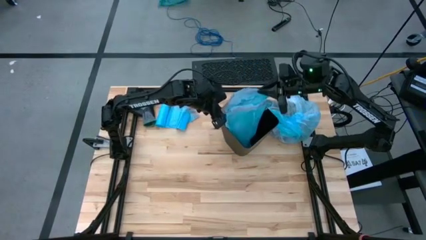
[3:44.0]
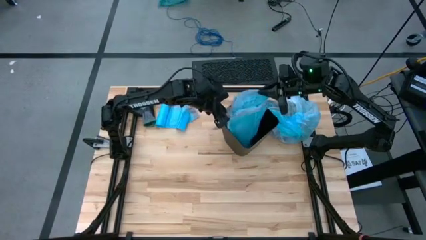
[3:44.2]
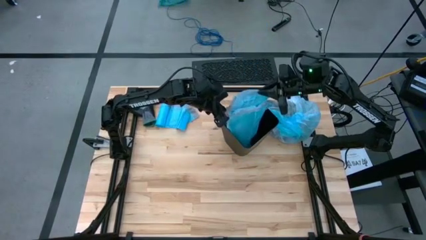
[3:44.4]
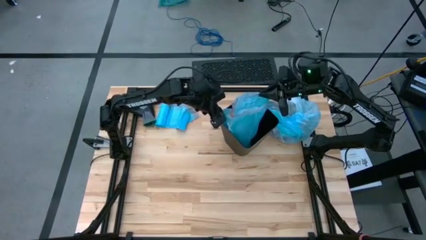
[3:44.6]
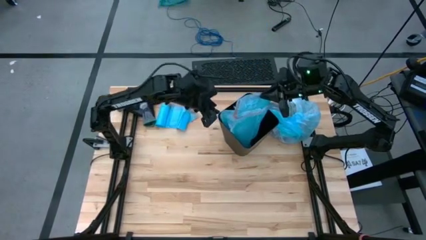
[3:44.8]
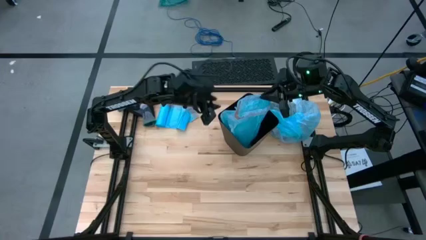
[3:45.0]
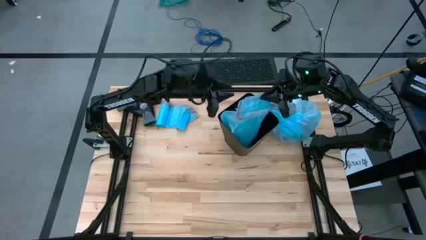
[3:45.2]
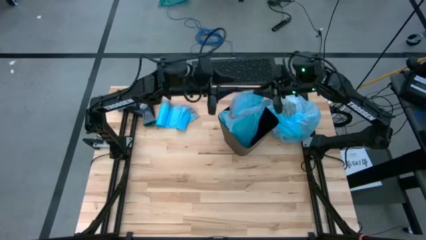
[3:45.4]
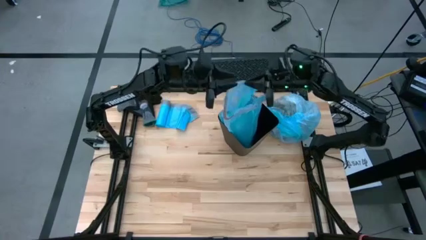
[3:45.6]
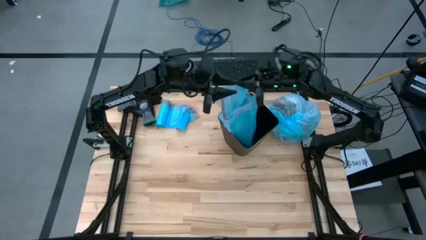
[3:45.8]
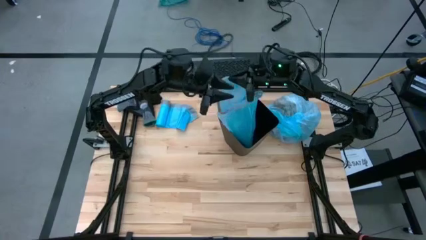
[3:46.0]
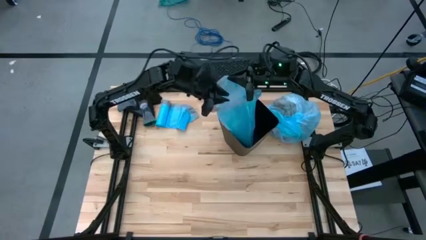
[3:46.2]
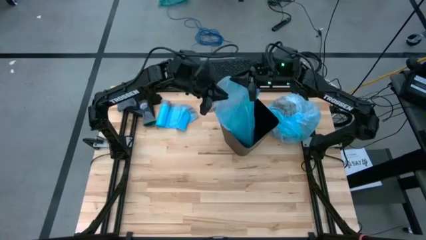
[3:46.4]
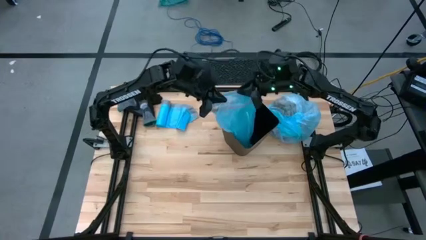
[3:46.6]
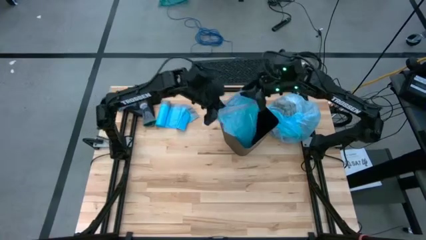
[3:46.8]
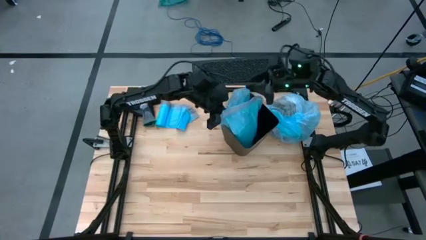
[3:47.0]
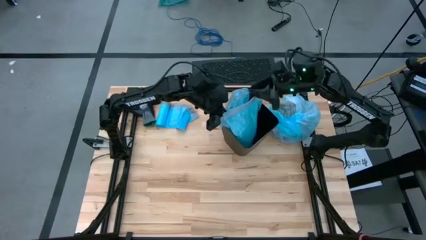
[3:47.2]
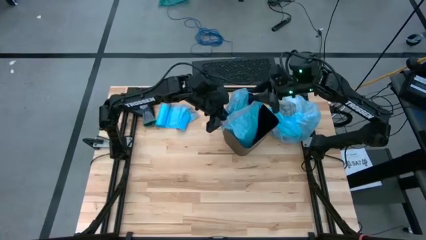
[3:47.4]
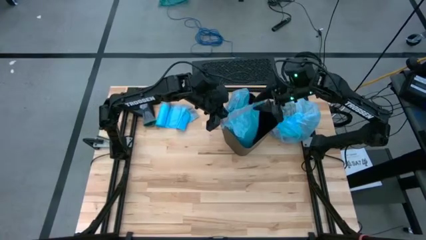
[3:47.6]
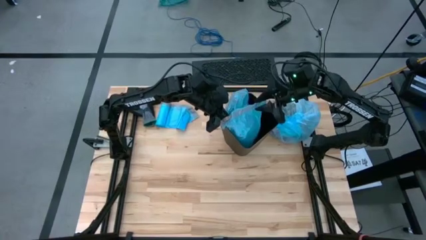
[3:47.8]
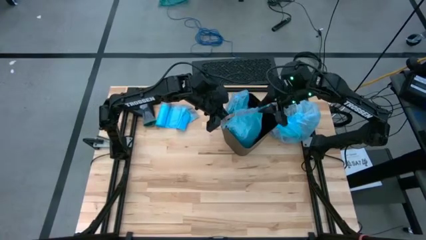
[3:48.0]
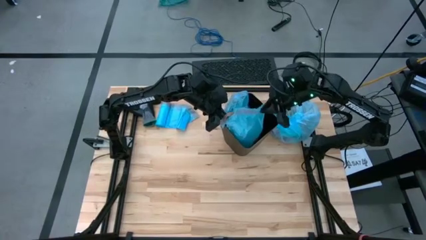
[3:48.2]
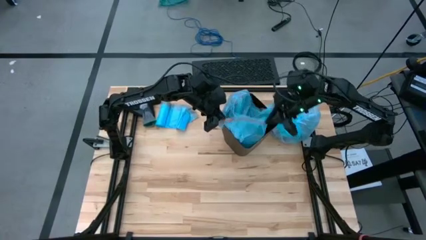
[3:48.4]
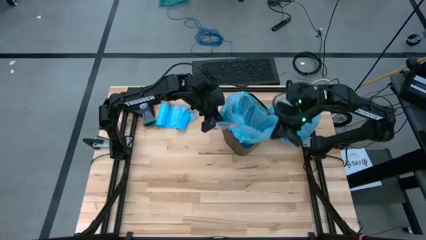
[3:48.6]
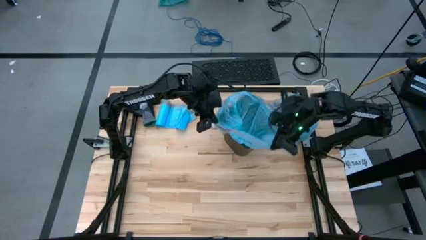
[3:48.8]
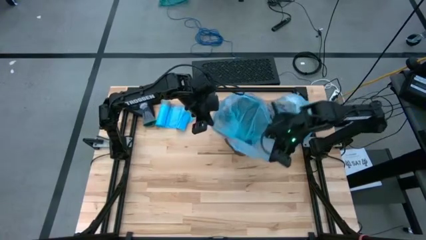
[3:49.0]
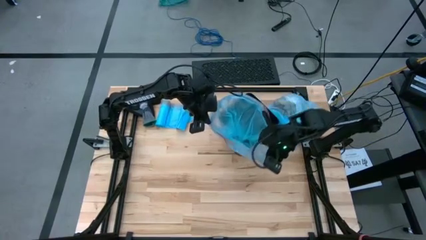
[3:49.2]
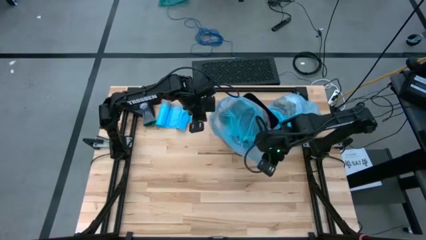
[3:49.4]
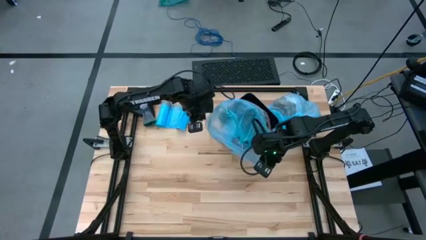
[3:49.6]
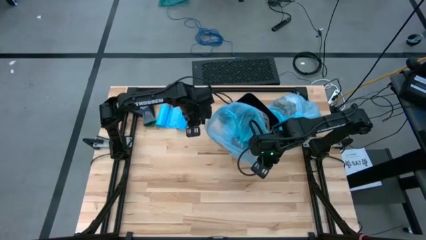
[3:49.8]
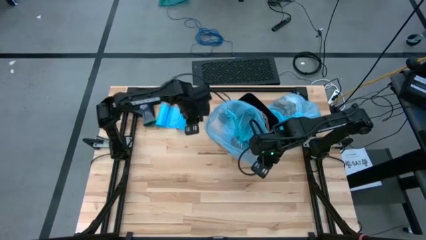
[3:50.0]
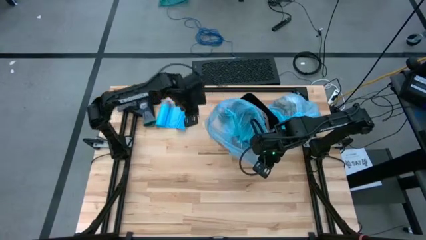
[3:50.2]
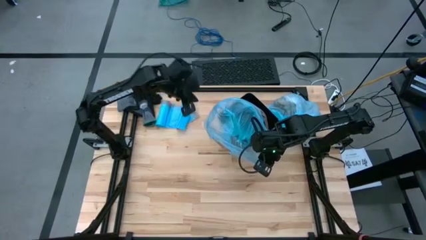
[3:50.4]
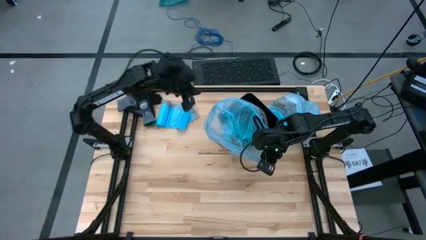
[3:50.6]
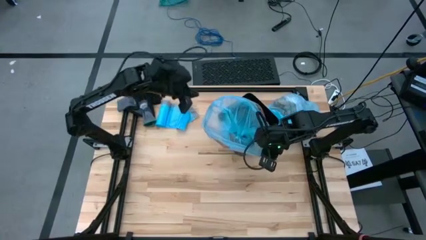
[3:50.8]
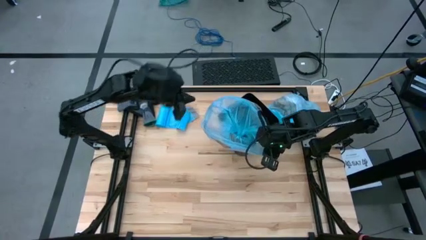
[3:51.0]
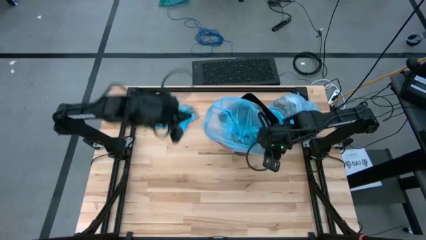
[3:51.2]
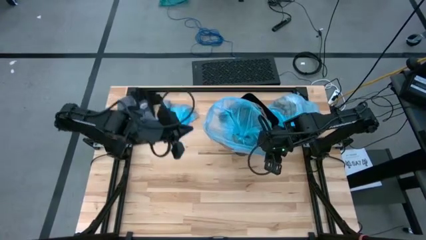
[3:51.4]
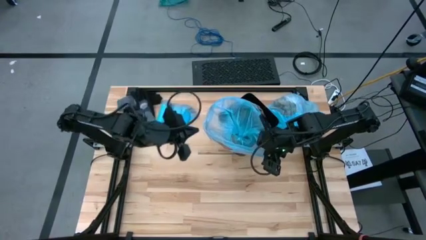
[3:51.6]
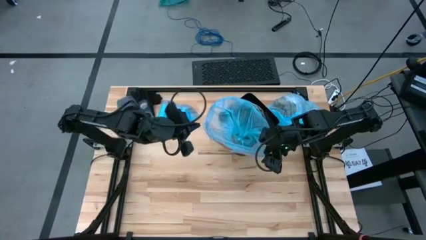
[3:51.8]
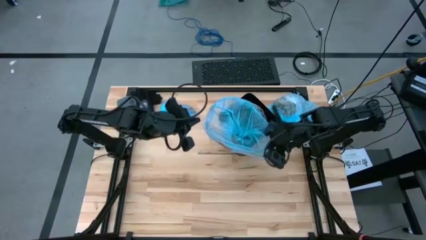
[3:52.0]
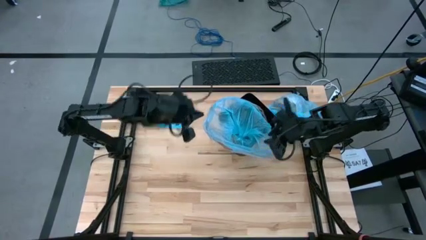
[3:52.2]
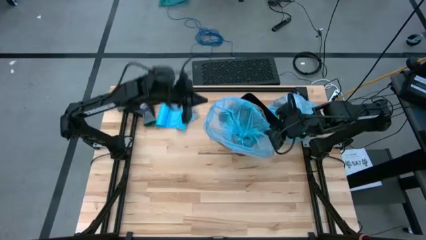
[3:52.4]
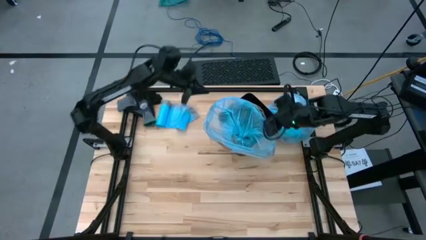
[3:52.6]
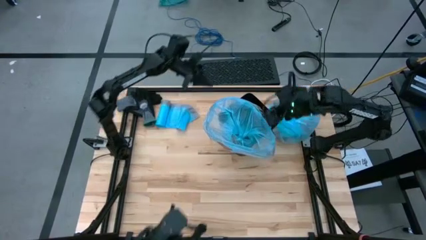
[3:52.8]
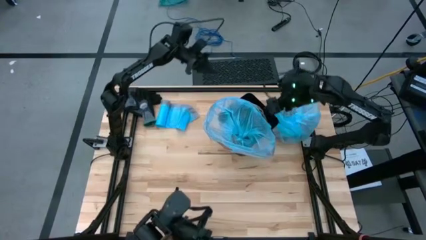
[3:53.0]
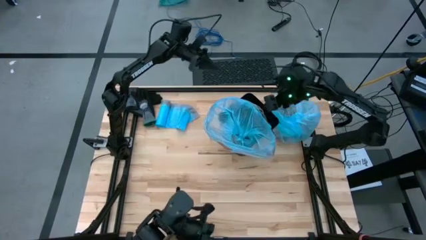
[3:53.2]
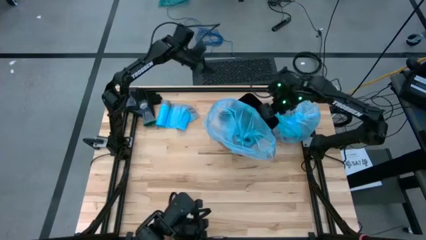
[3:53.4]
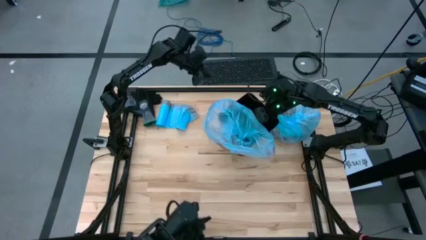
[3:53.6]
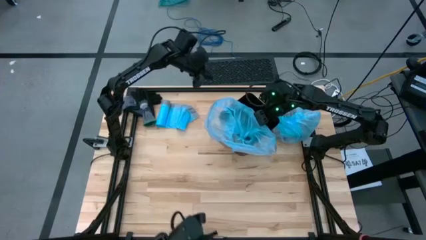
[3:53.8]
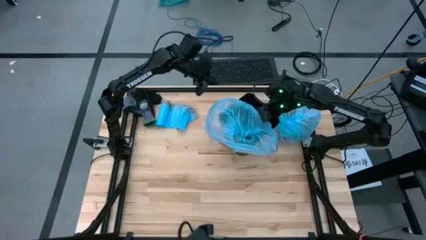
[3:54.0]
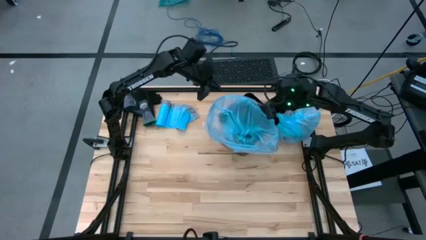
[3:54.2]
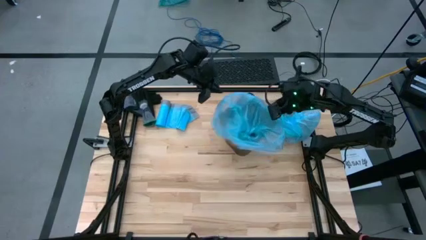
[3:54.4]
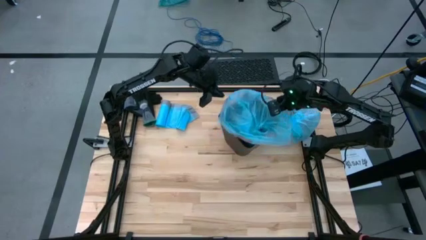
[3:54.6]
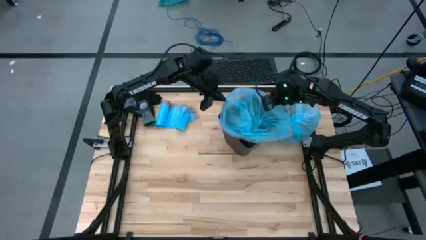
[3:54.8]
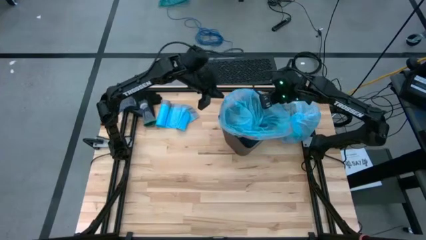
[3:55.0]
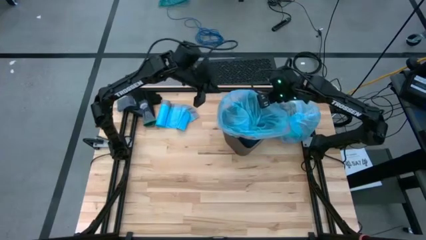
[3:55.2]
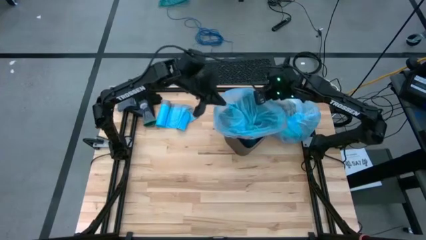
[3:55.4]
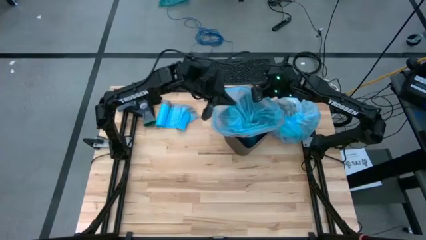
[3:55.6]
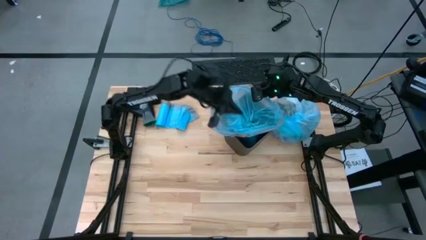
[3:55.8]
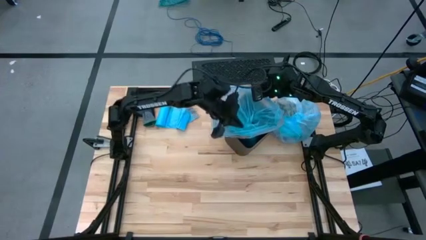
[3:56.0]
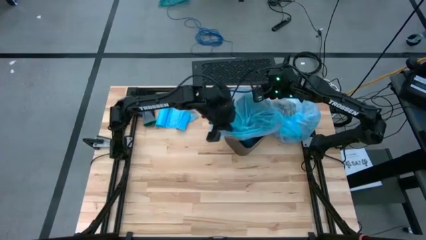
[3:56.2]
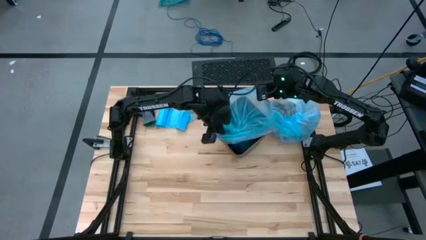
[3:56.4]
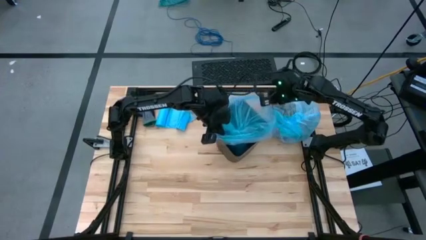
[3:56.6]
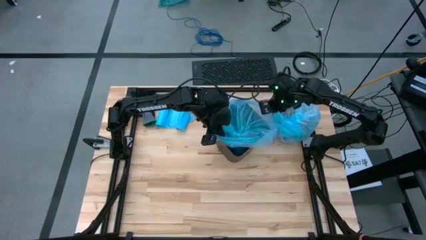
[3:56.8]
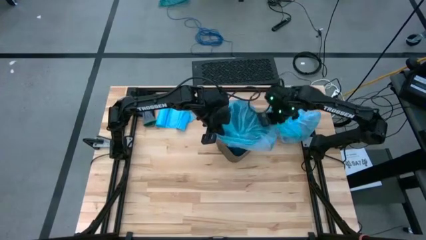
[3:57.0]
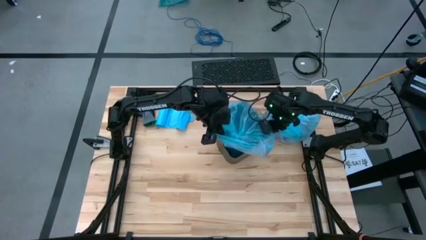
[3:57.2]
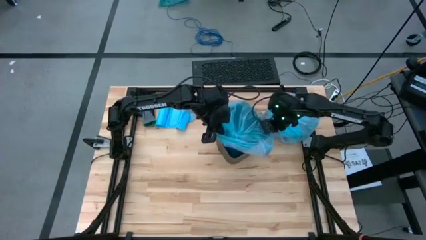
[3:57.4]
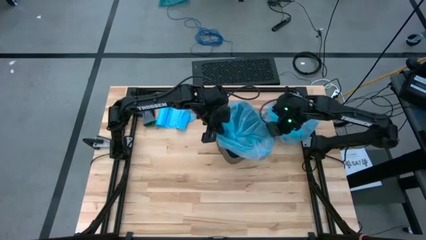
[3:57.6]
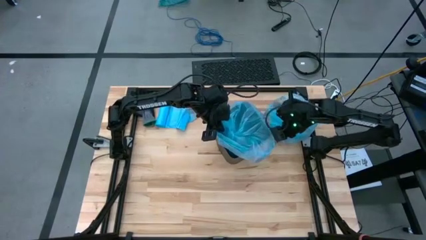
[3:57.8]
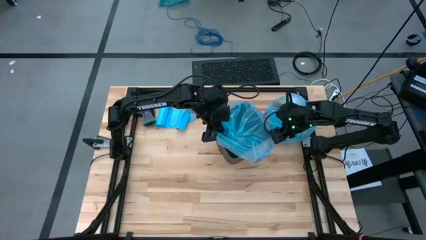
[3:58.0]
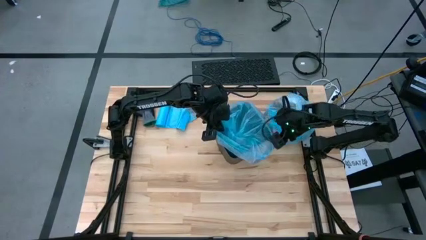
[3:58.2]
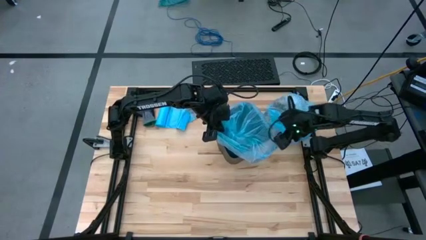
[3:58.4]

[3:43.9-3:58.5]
Task: place trash/remove bag and relplace
Put the blue trash bag into the trash bin
